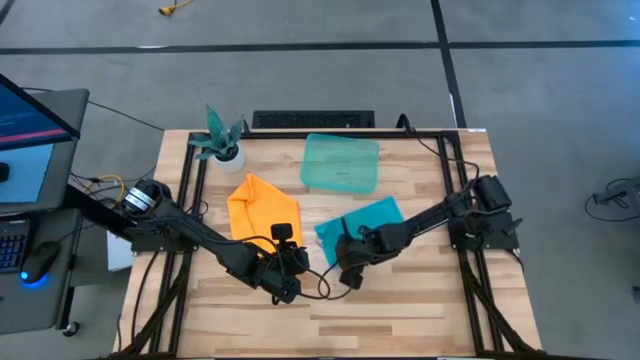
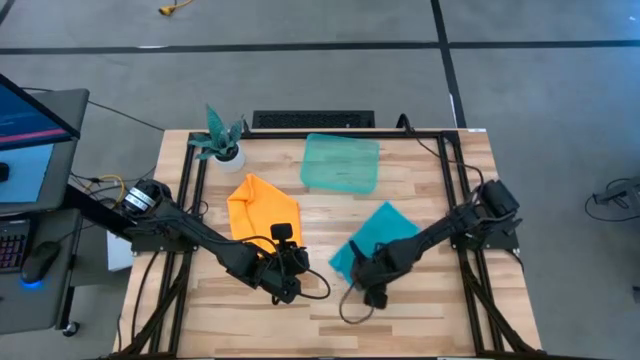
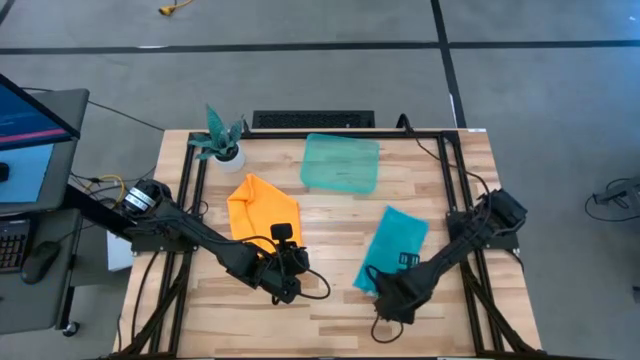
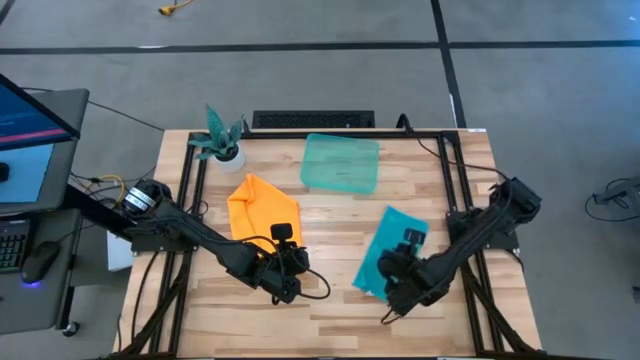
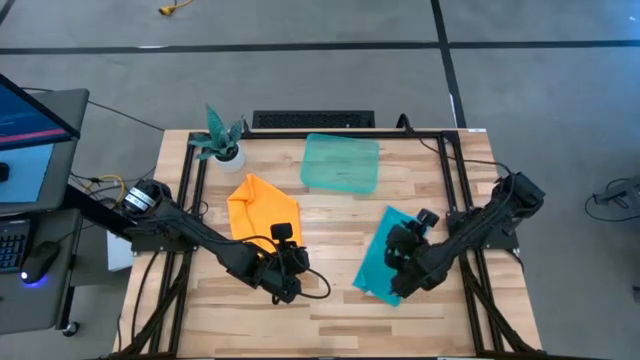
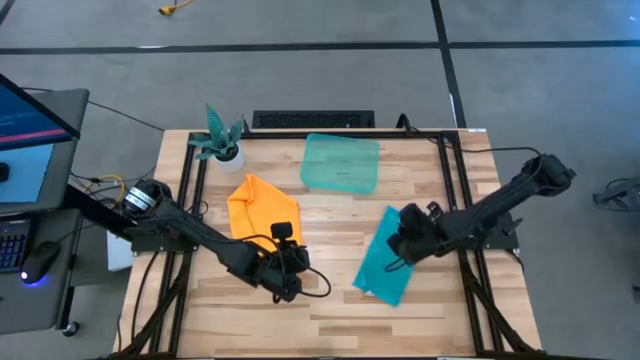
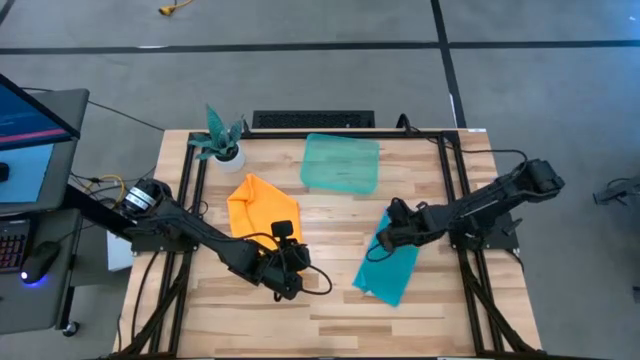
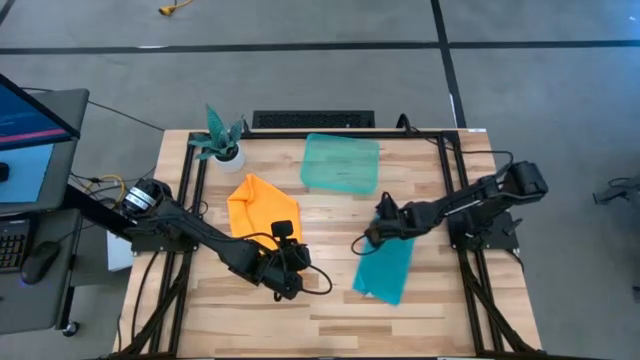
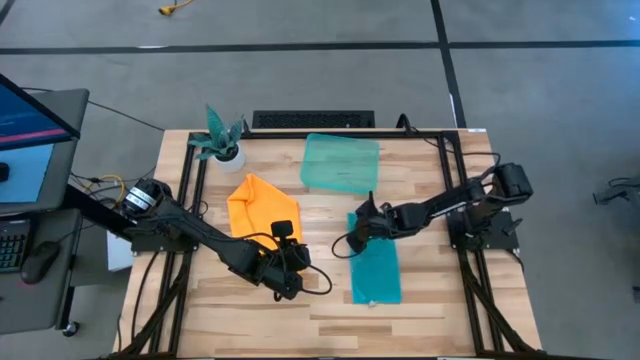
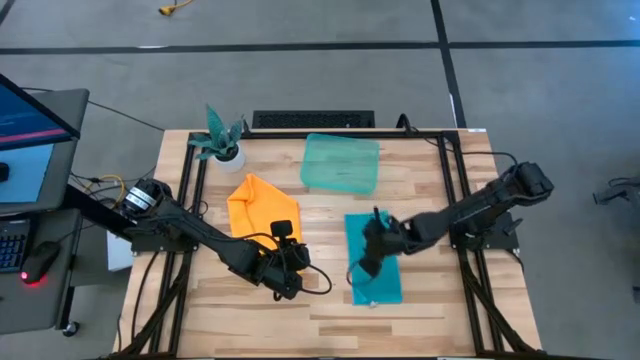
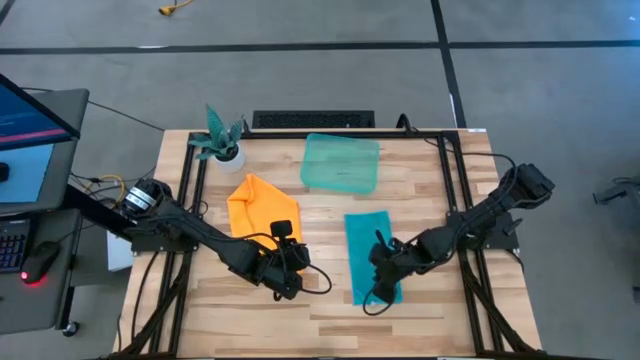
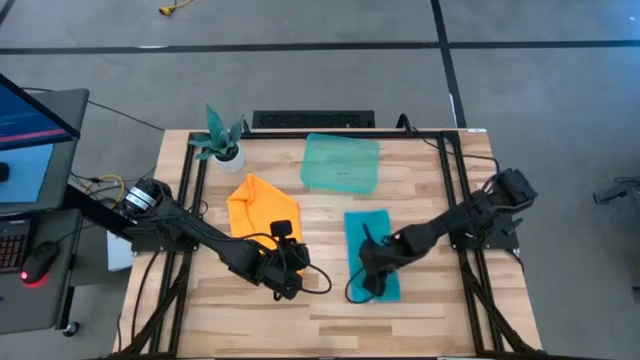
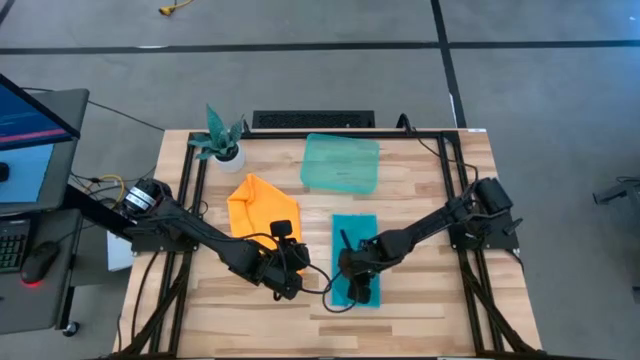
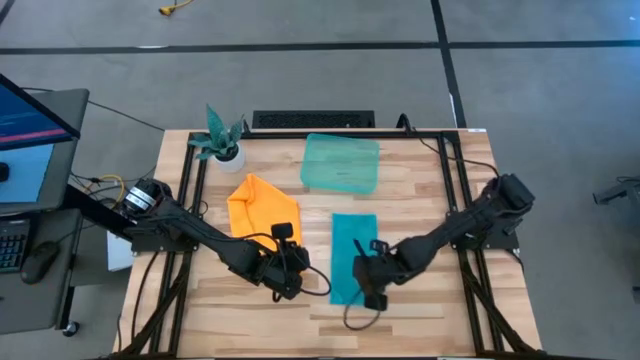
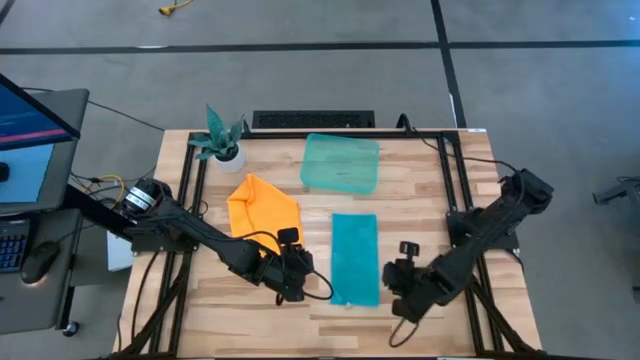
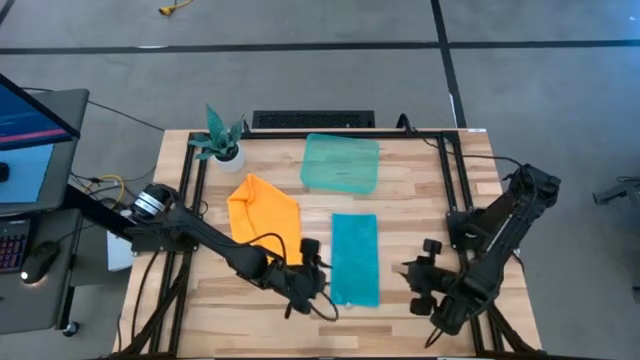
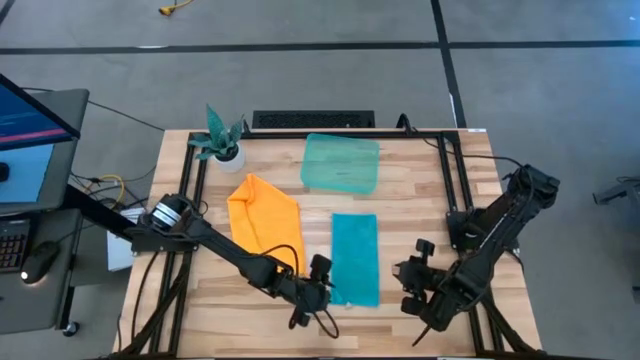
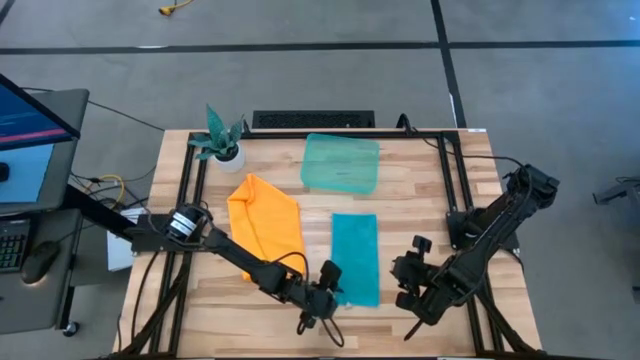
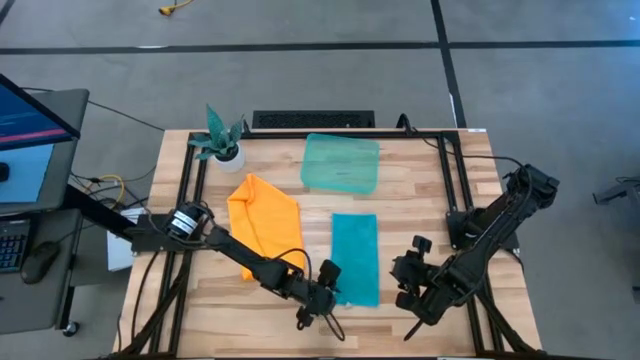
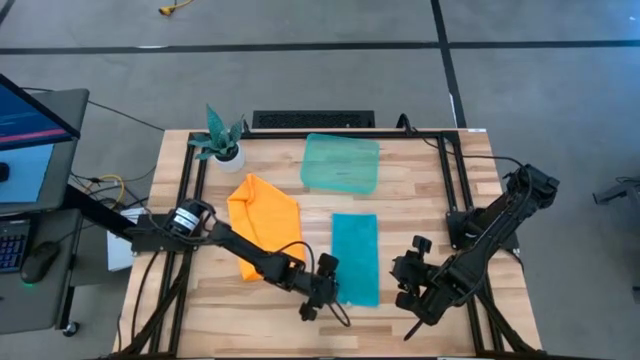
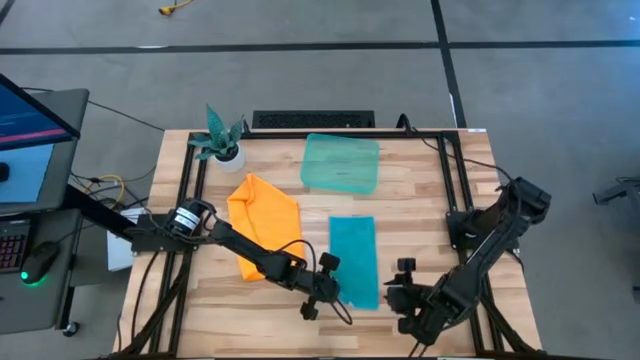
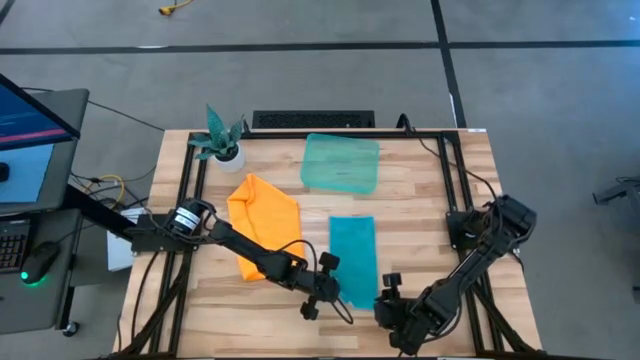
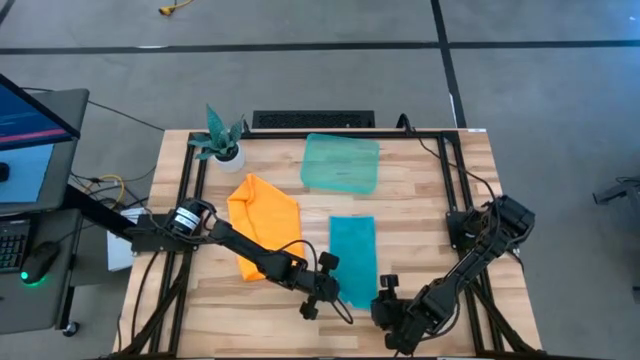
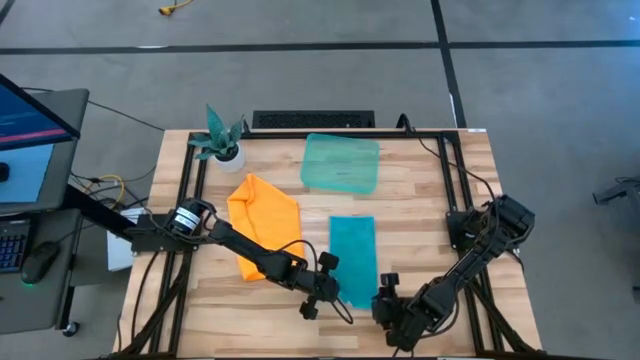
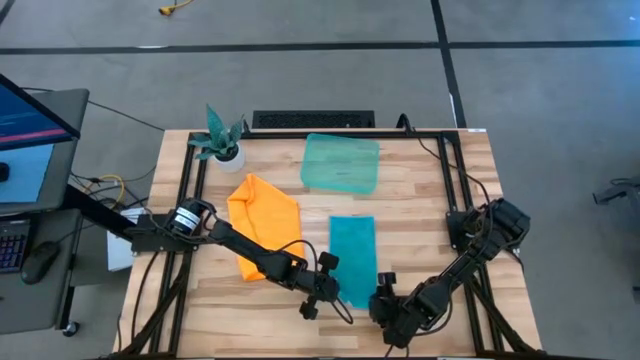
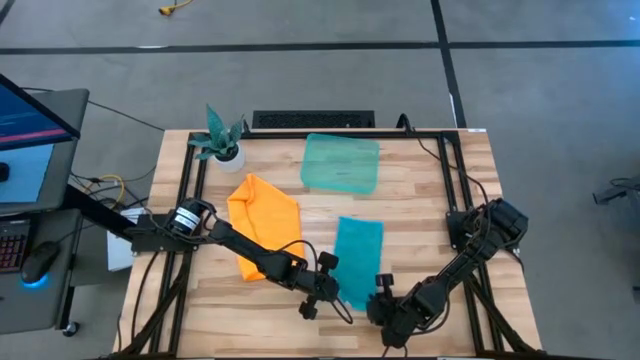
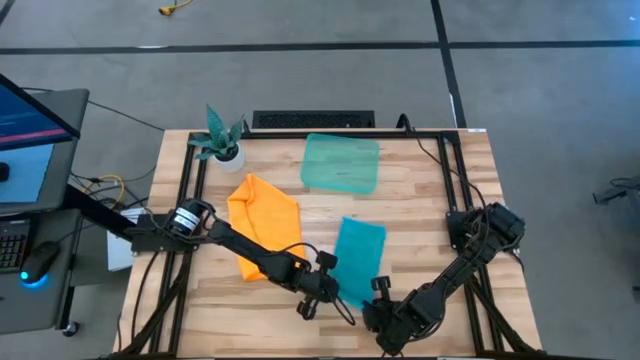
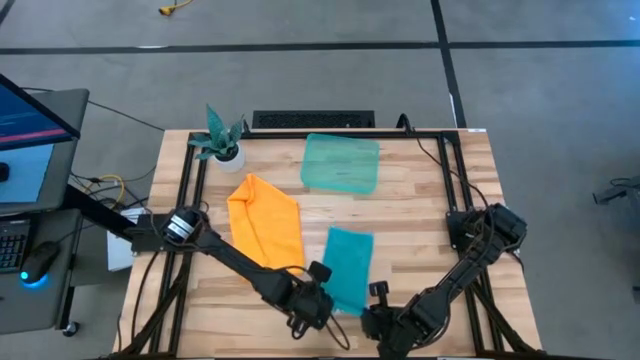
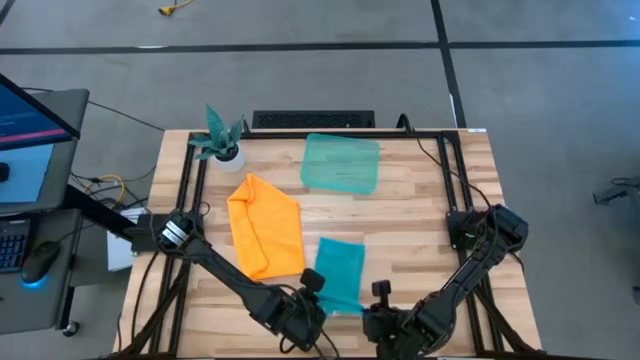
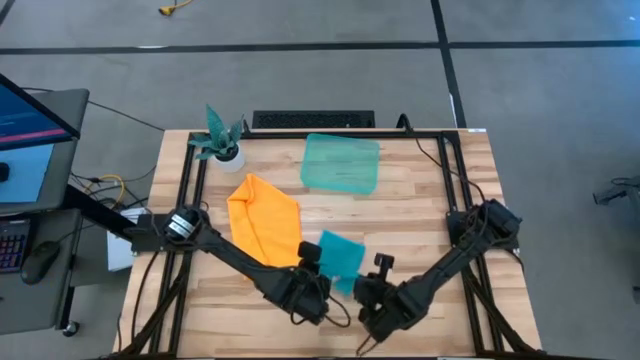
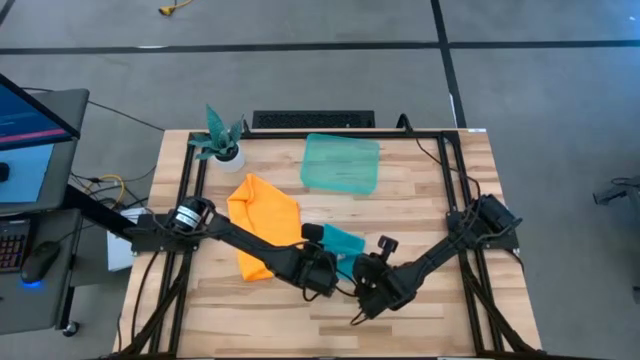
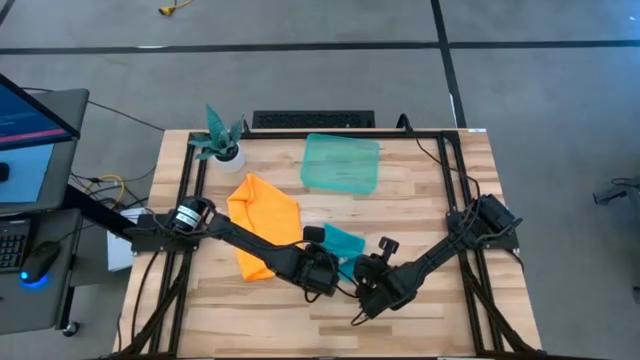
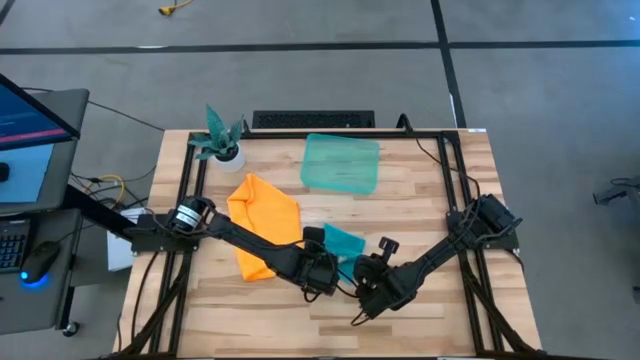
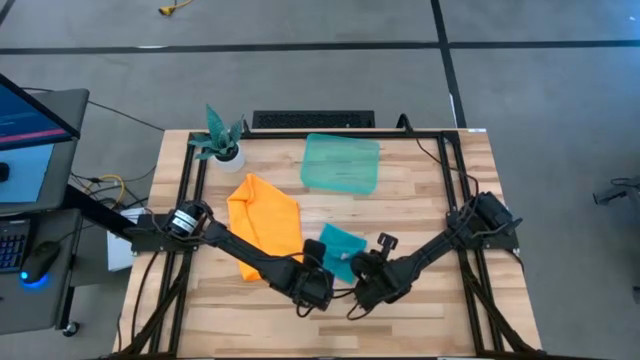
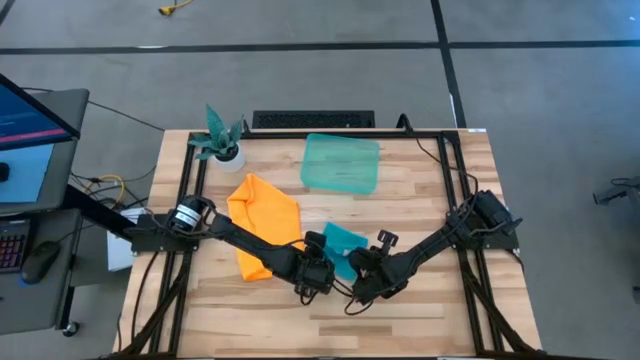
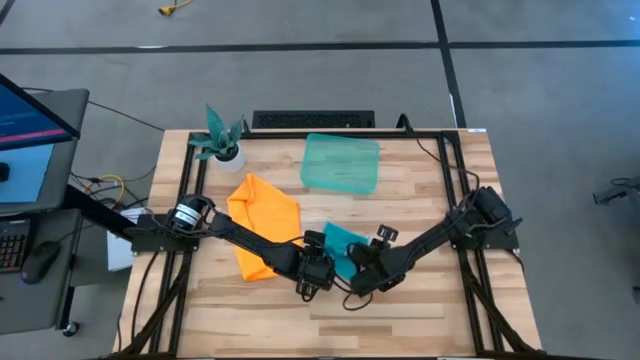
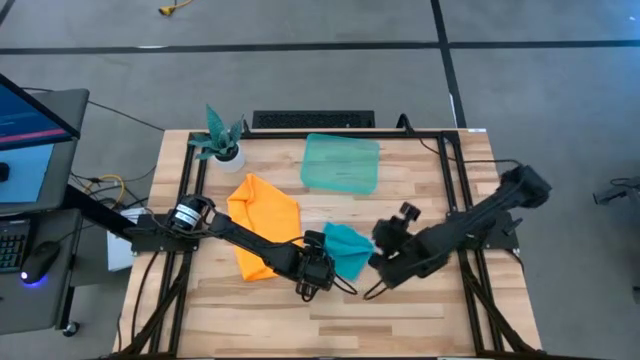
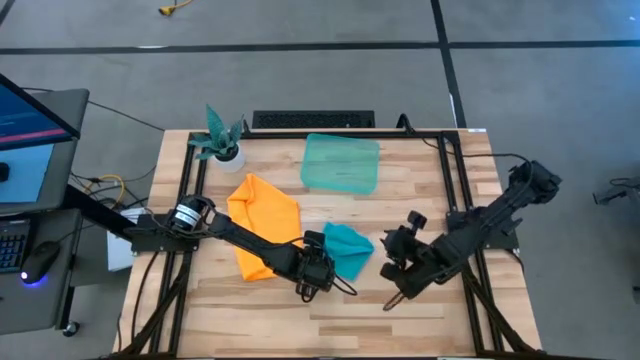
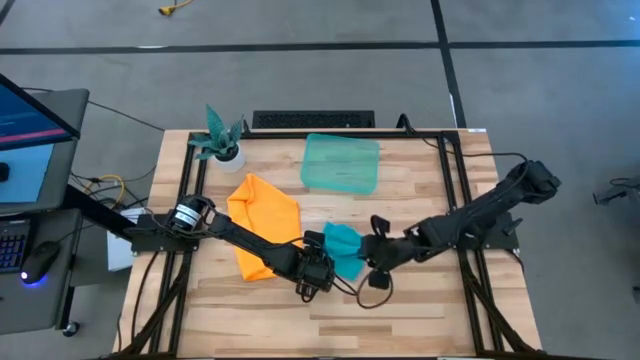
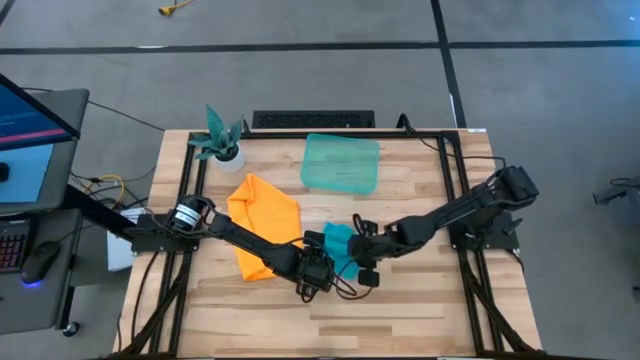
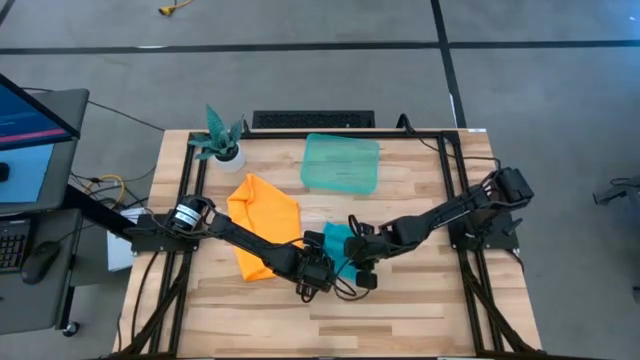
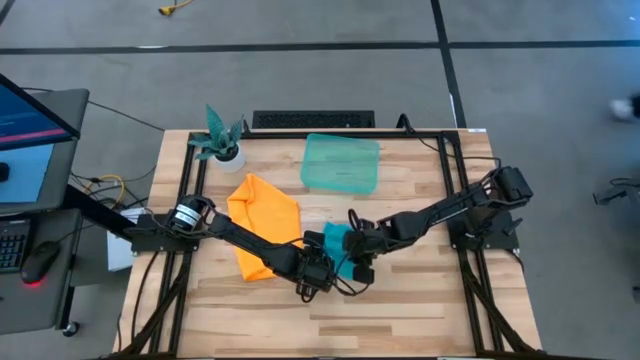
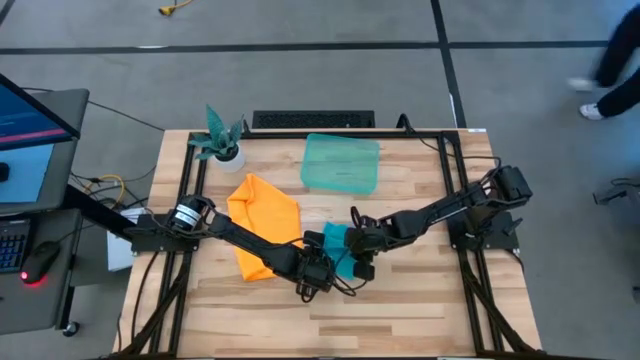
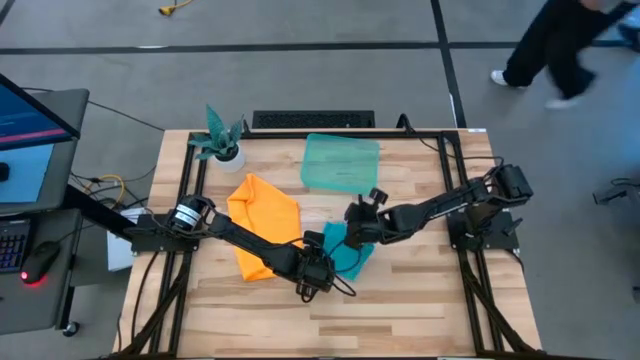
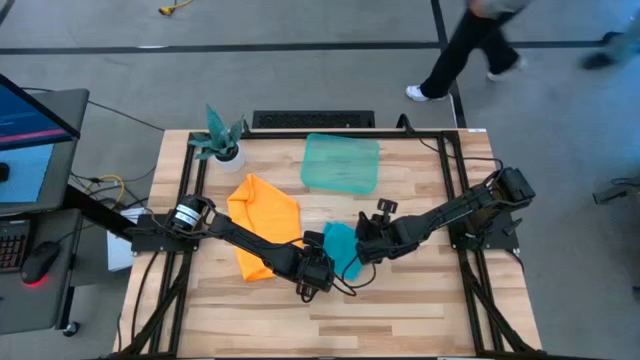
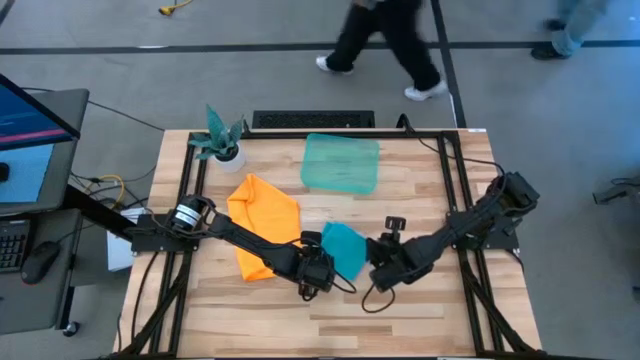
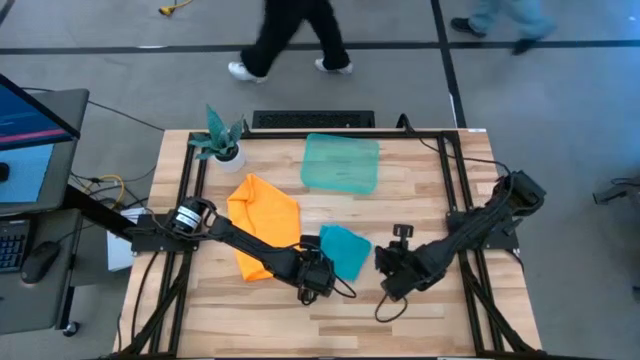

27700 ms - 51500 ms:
Task: Roll microfiber towels into tight, uniform cylinder then place into a basket
Fold the blue microfiber towel
